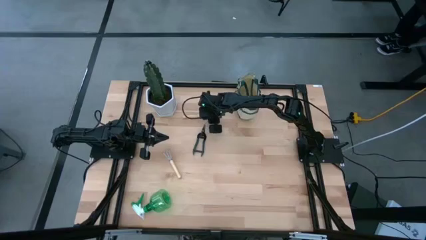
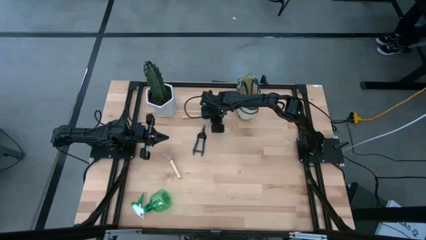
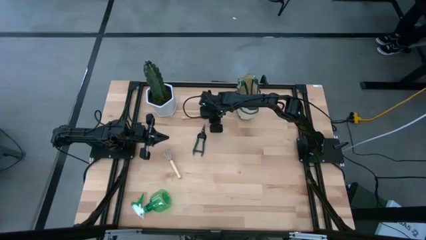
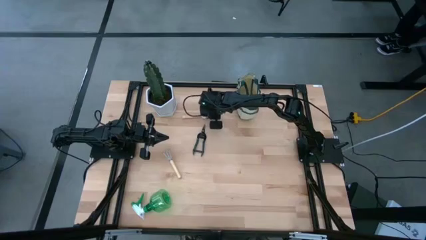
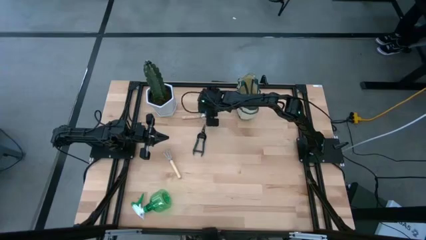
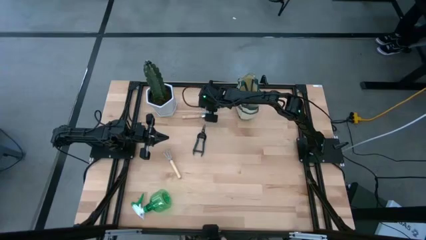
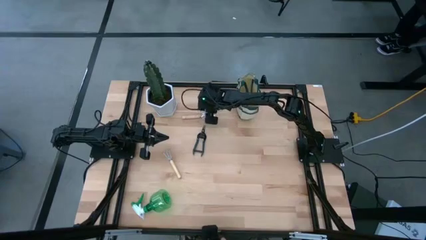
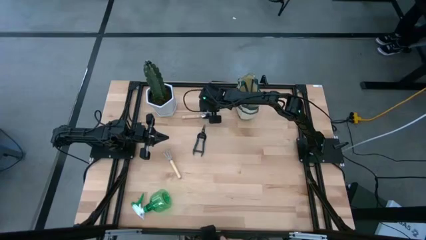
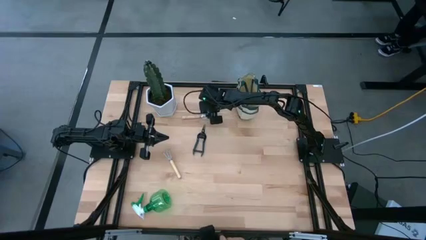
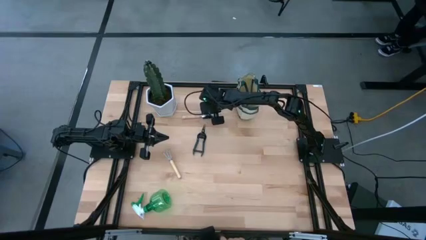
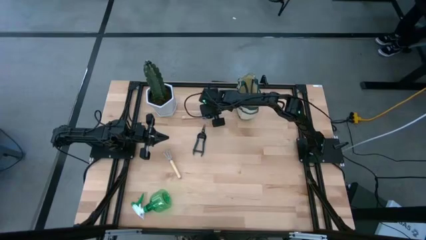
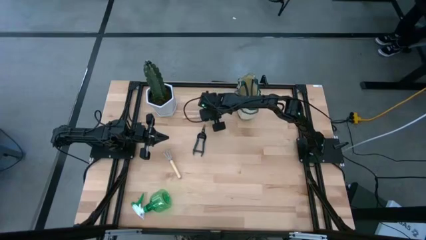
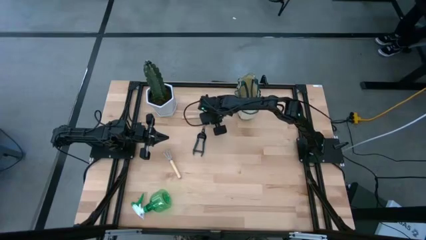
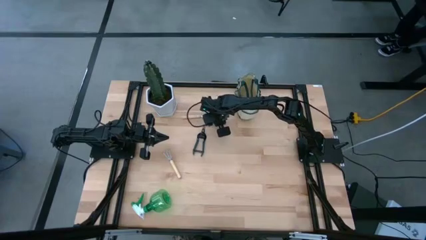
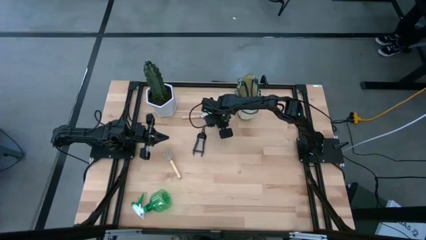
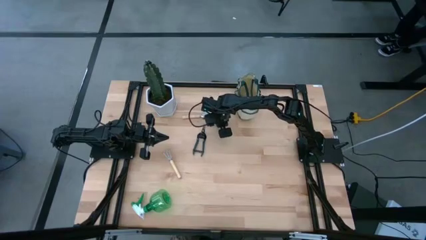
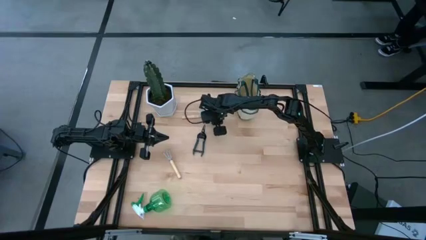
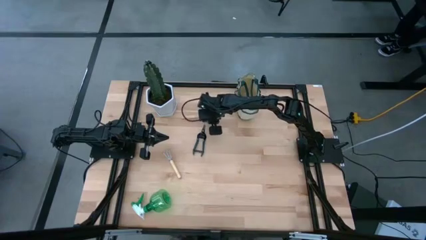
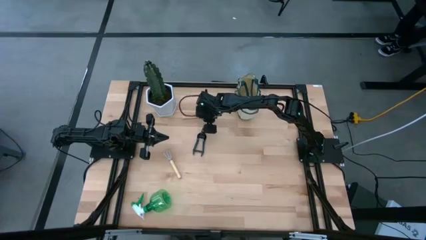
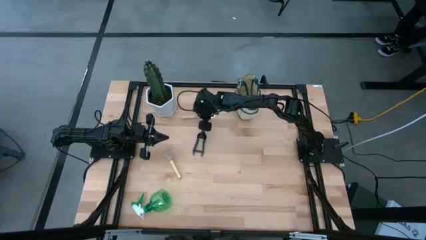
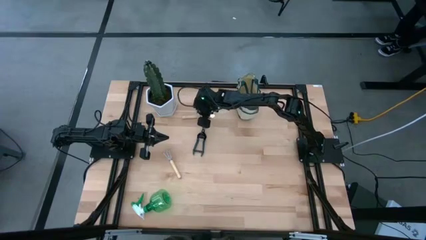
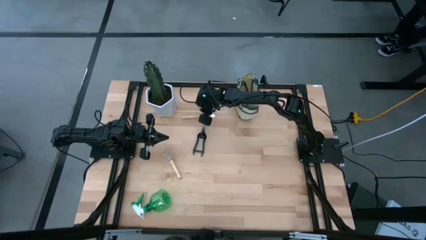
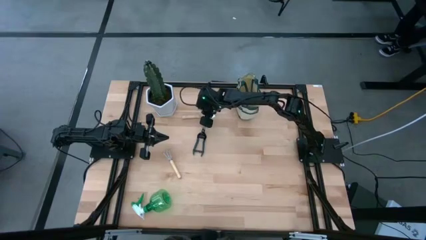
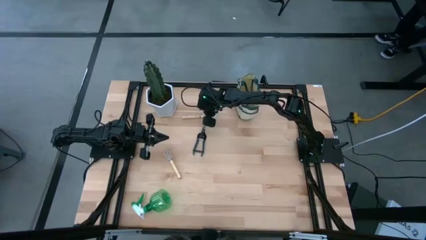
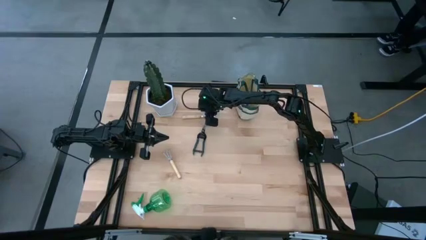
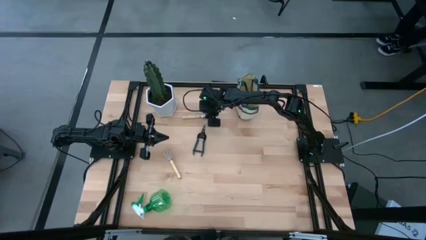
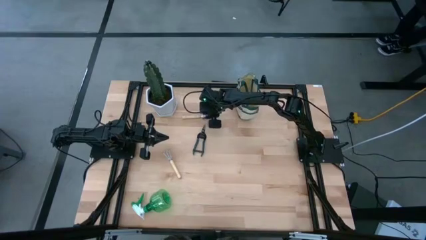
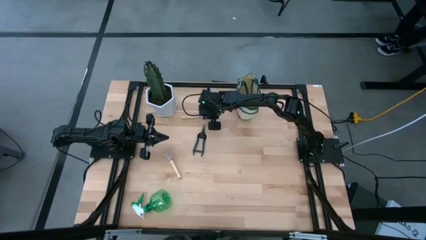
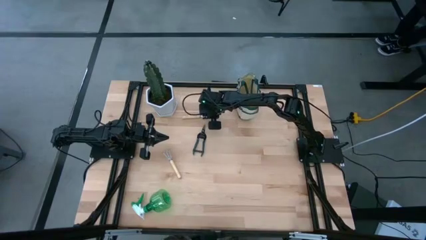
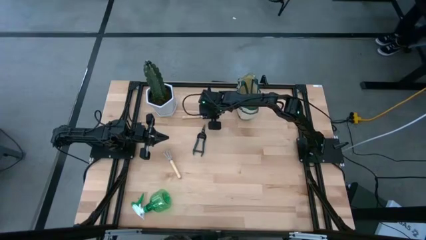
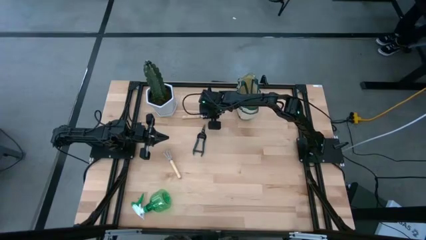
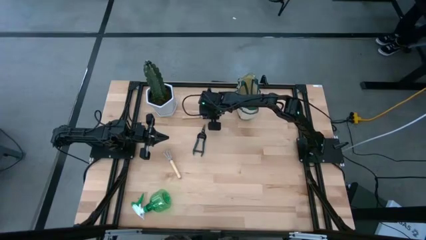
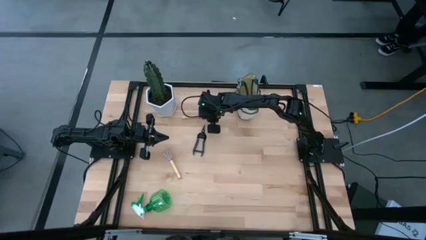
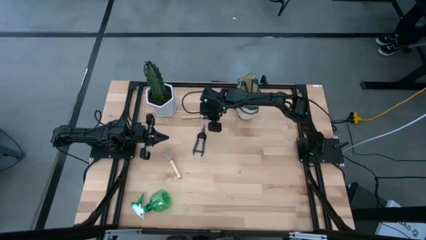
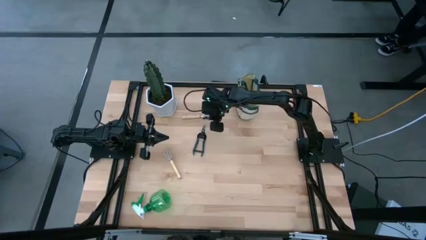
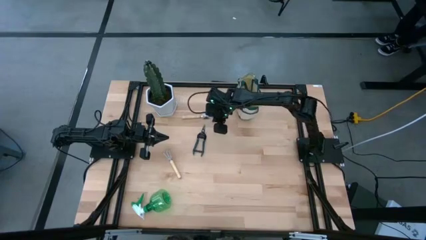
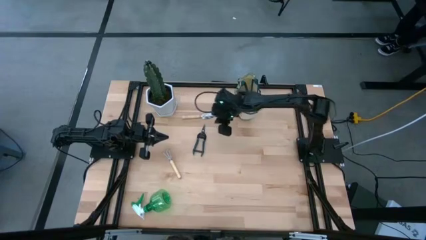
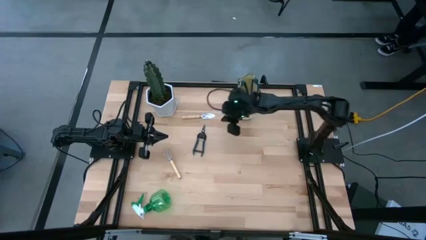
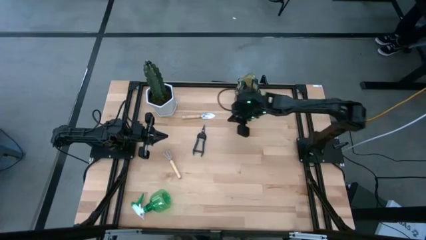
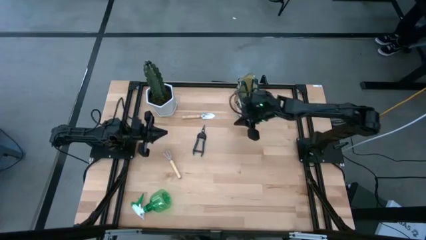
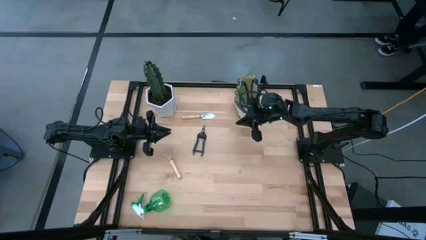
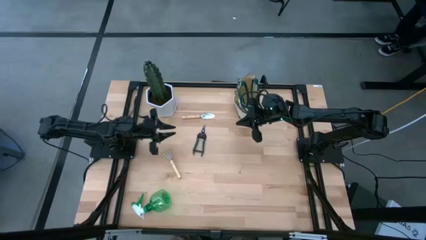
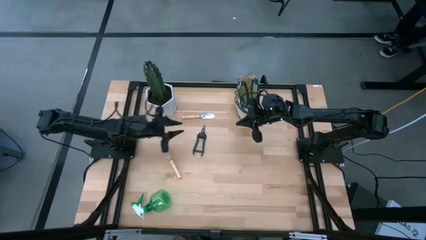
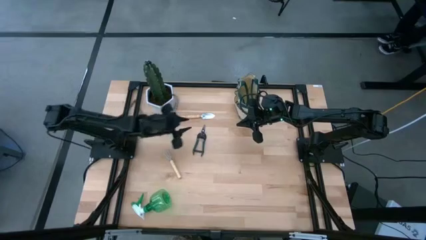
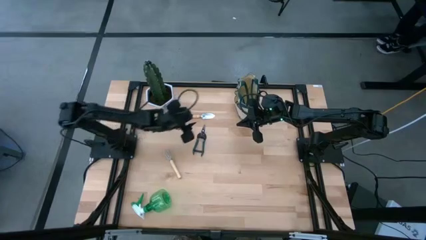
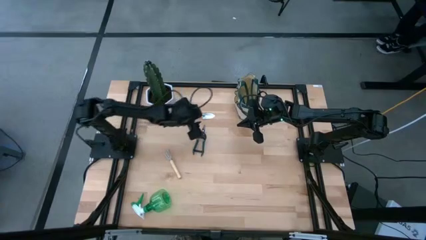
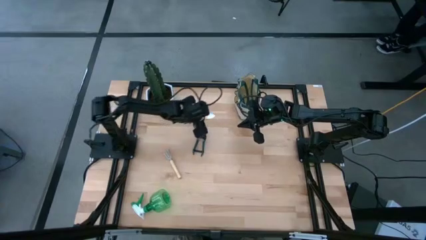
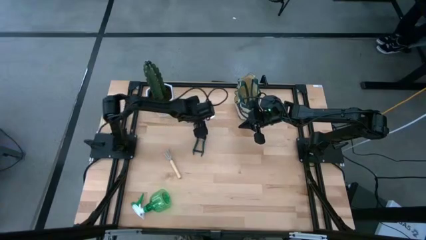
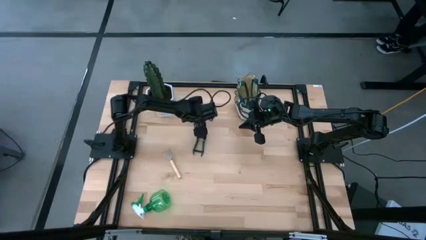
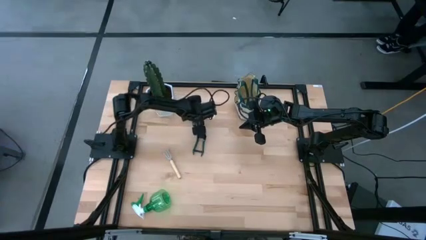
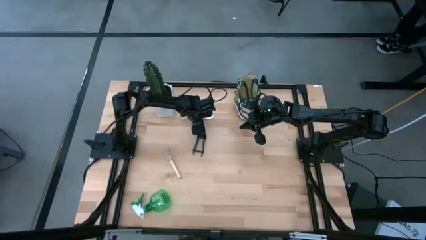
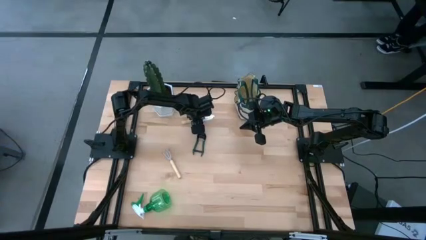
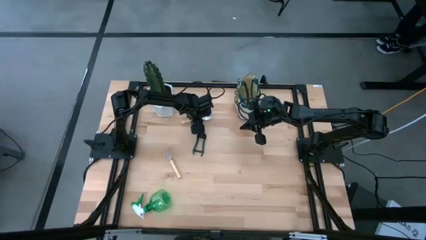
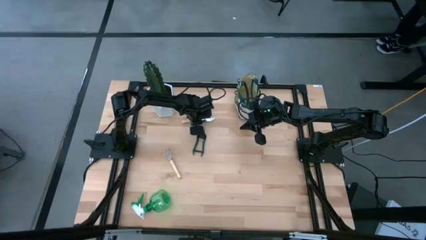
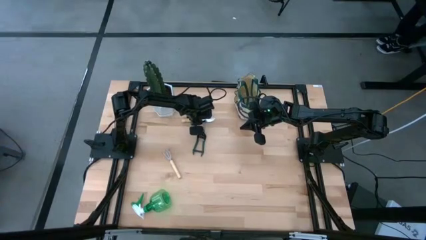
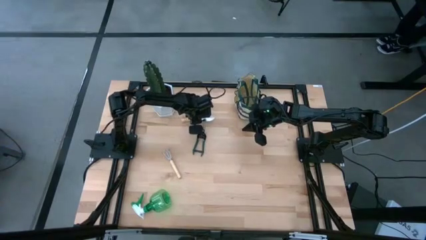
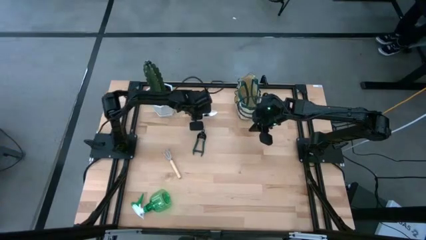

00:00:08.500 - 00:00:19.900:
Task: Pick & Place Garden tools in Gardening bag
Put the trowel into the gardening bag

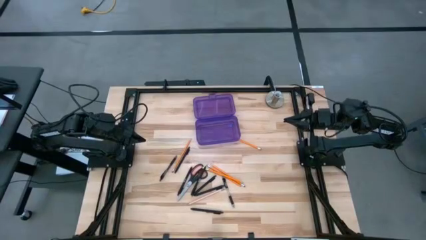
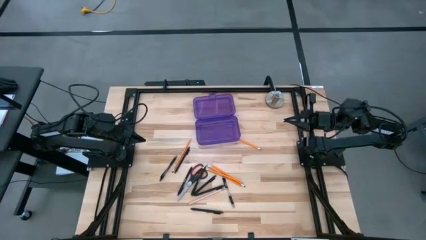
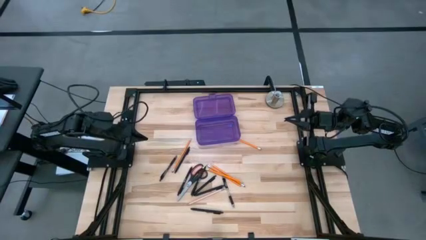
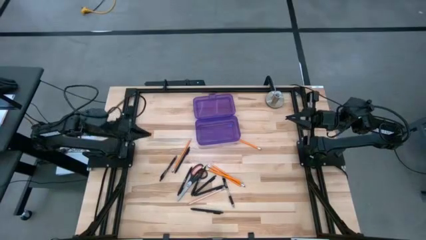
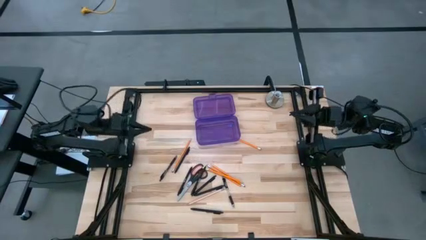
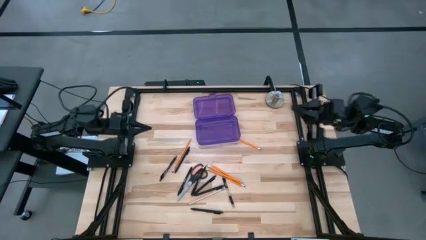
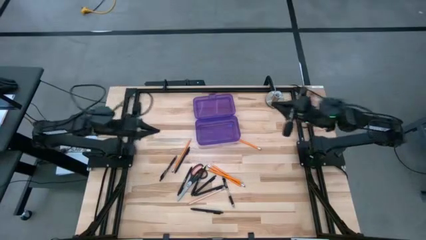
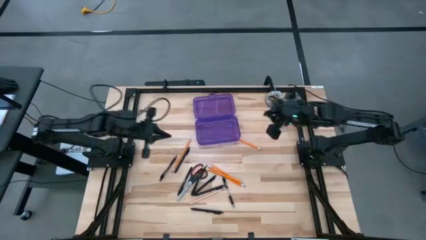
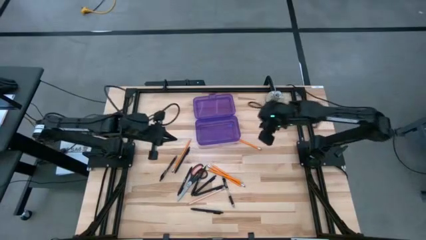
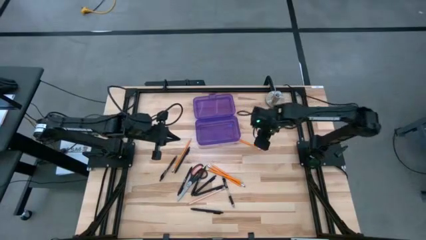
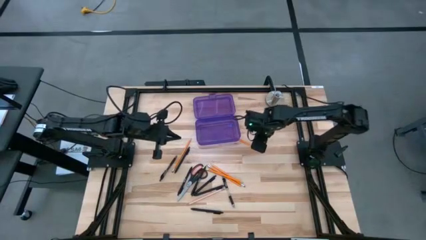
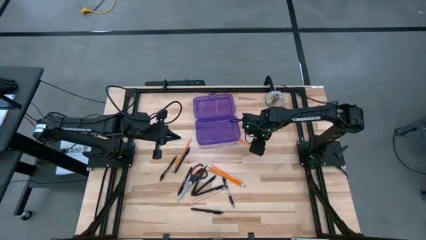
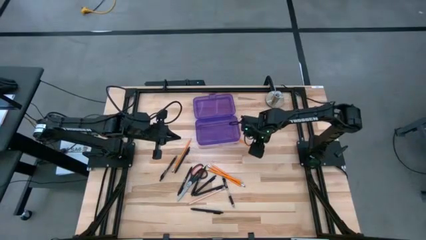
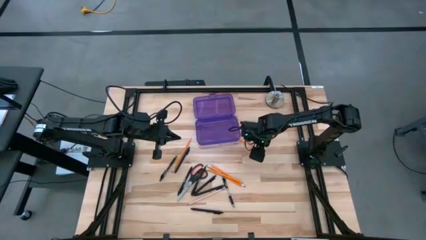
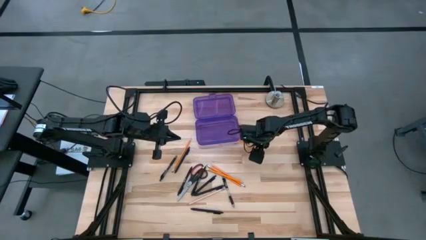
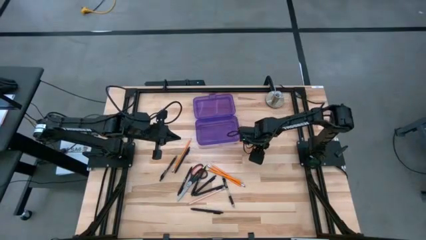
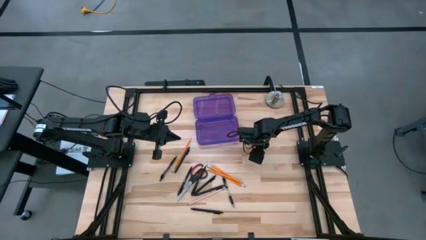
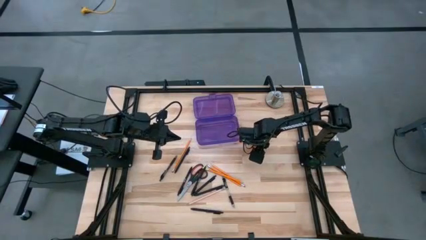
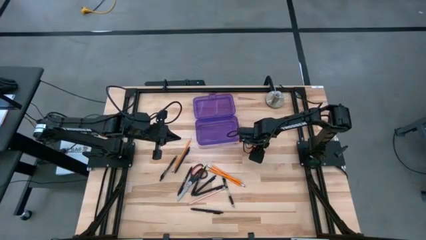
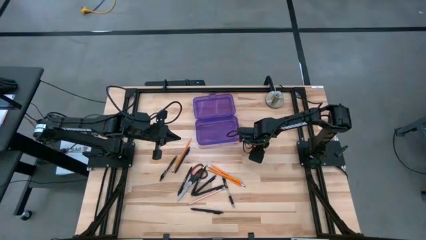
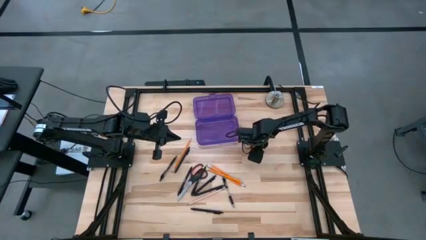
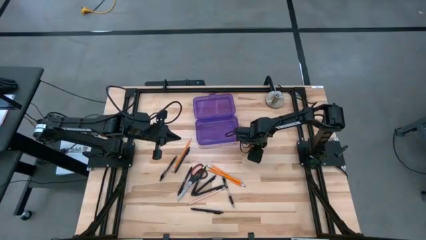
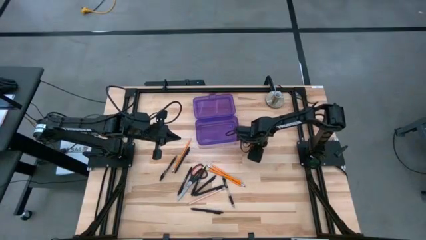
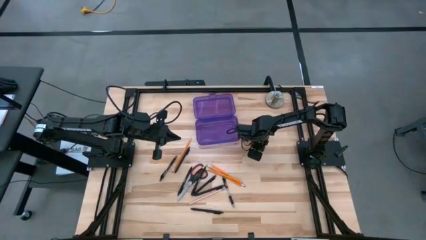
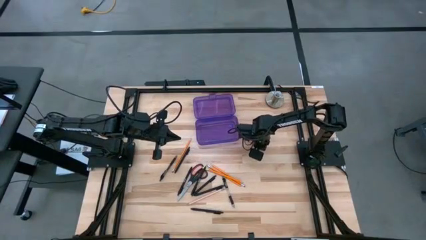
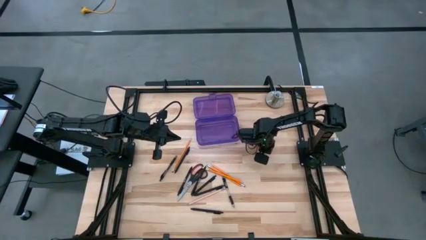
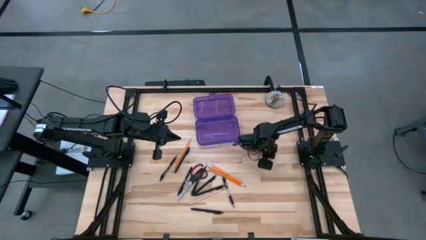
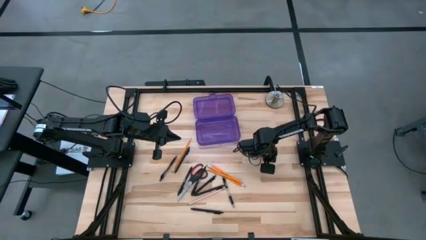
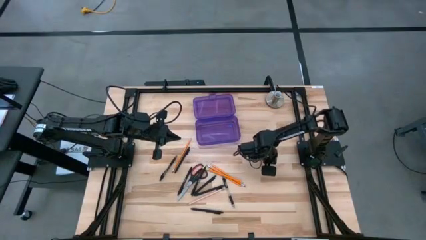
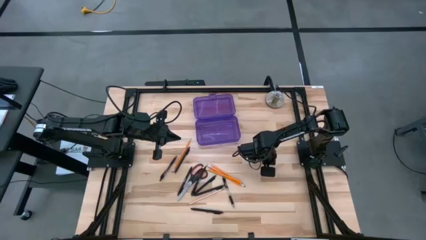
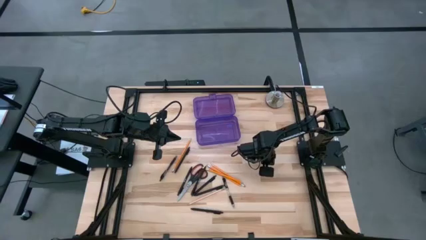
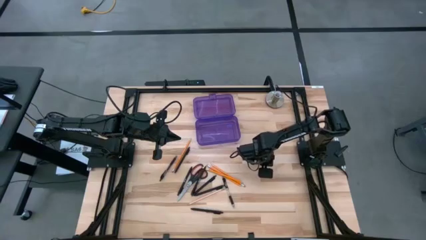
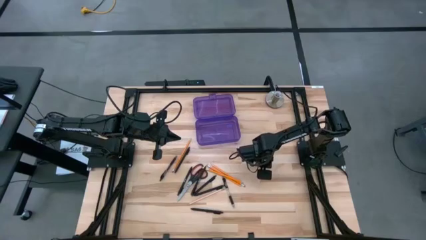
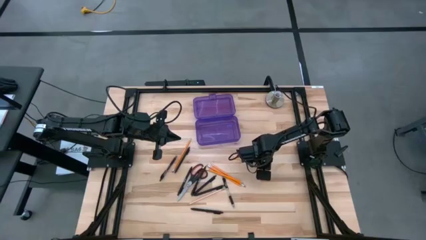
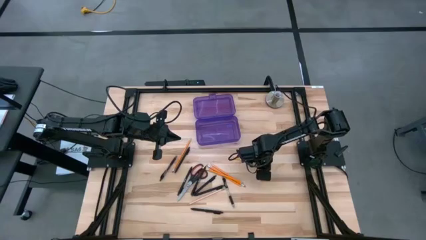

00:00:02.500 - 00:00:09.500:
Task: Pick & place school supplies into a supply box
Put the yellow pencil into the purple supply box
